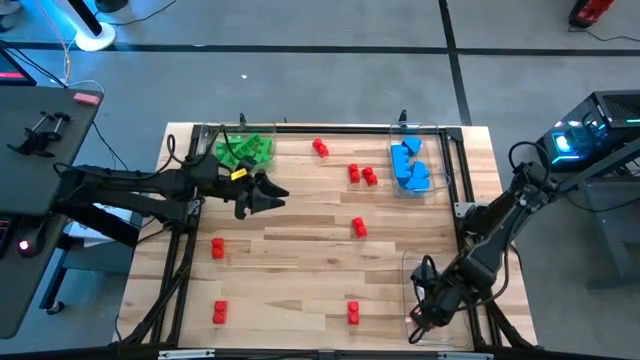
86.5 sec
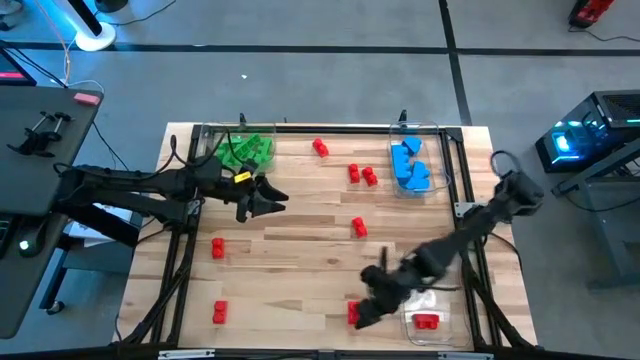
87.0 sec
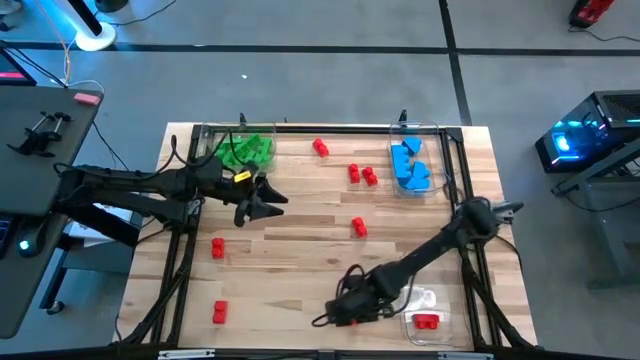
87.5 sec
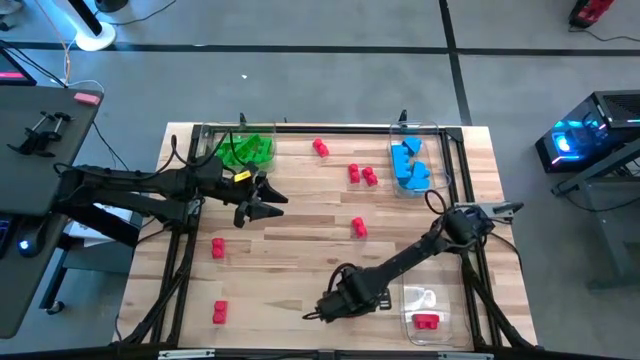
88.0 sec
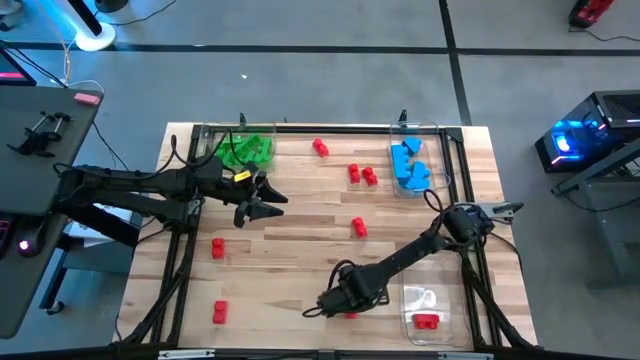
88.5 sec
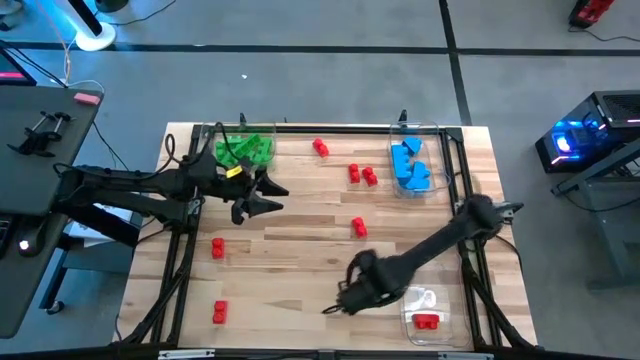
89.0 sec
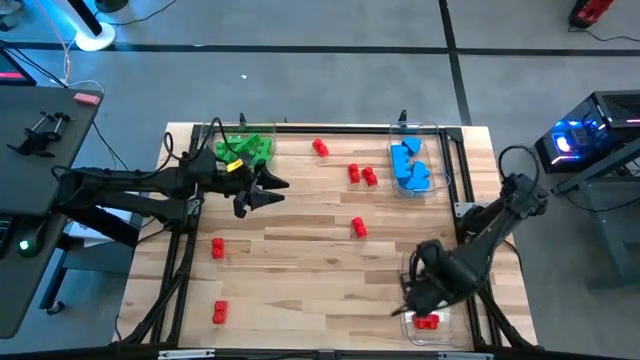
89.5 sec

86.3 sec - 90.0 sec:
Task: Sort blocks
Put the red game piece into the bottom transparent bin

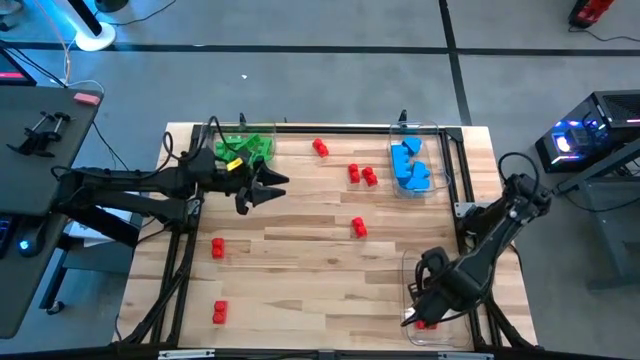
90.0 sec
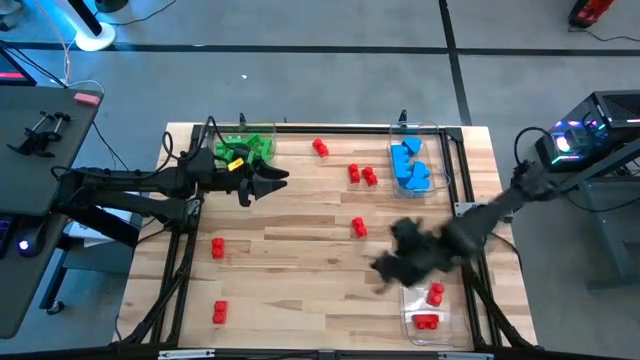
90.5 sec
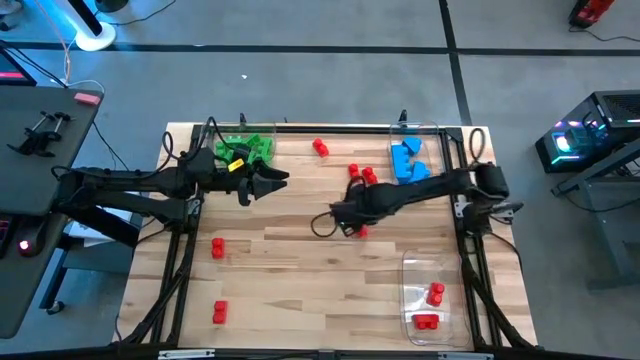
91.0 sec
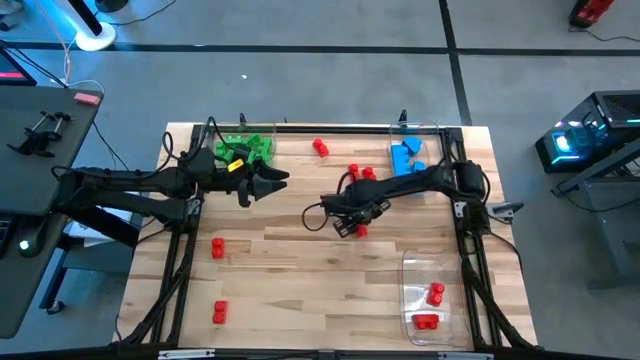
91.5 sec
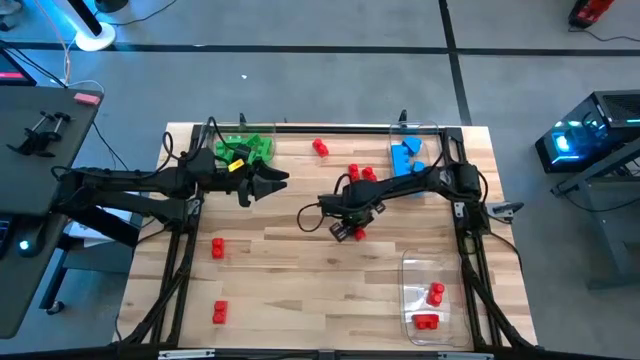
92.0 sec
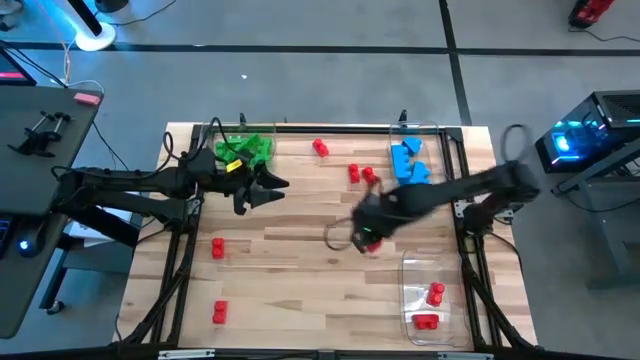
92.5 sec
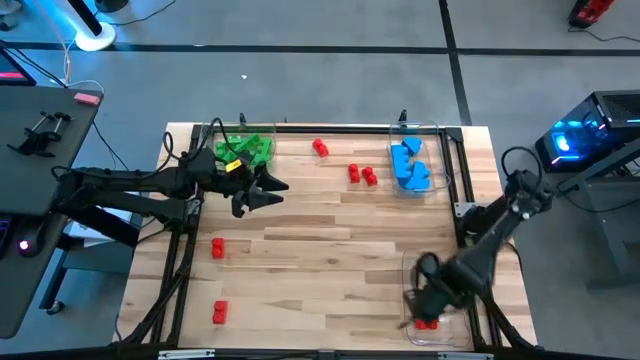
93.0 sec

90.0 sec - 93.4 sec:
Put the red game piece into the bottom transparent bin

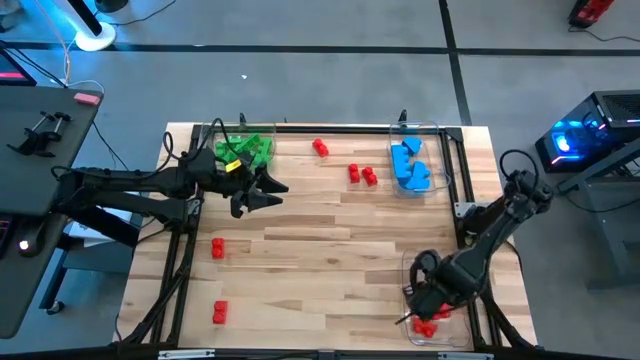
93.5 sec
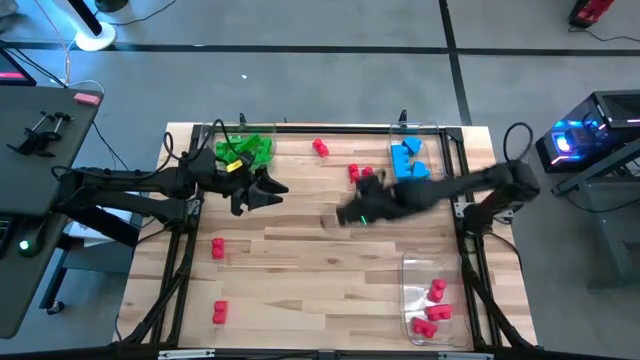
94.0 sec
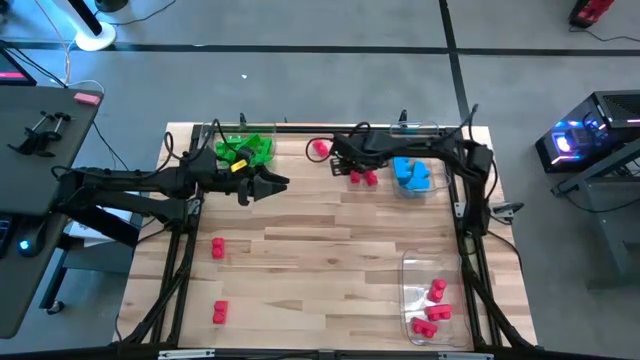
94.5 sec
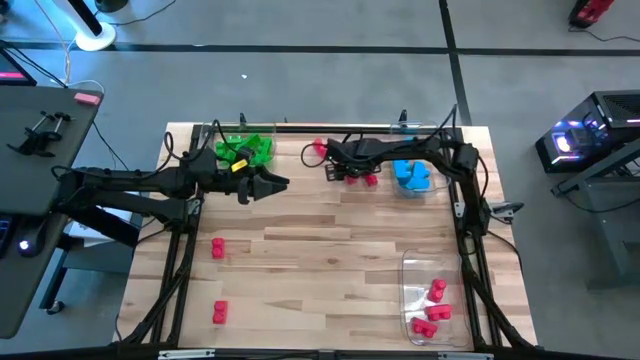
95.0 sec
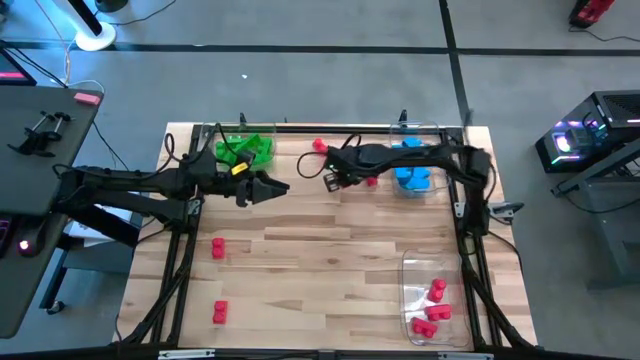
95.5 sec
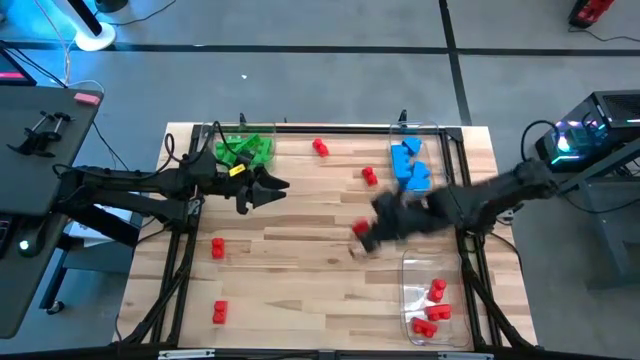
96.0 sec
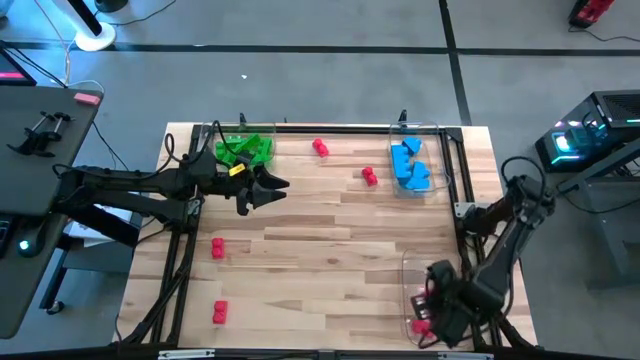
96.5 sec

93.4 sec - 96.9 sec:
Put the red game piece into the bottom transparent bin

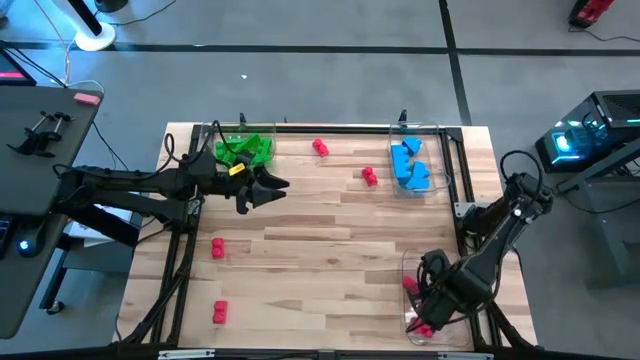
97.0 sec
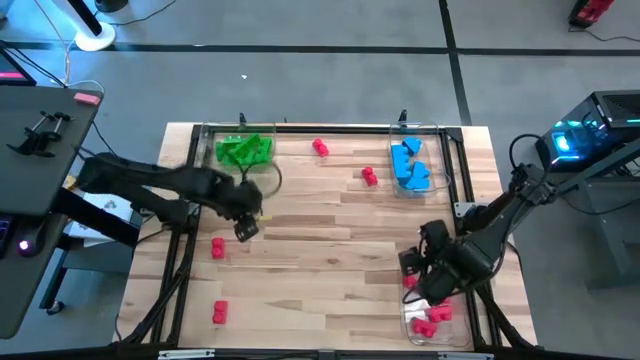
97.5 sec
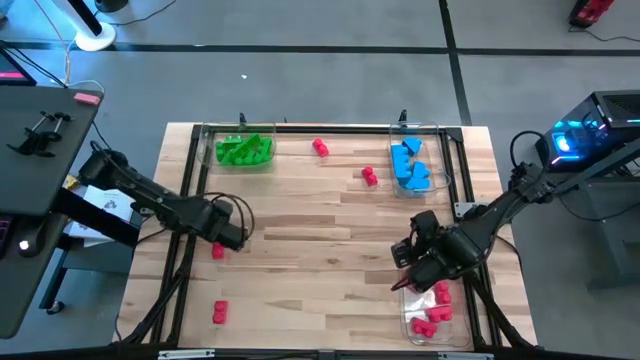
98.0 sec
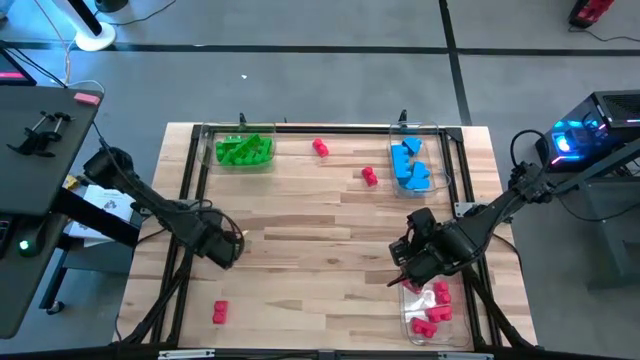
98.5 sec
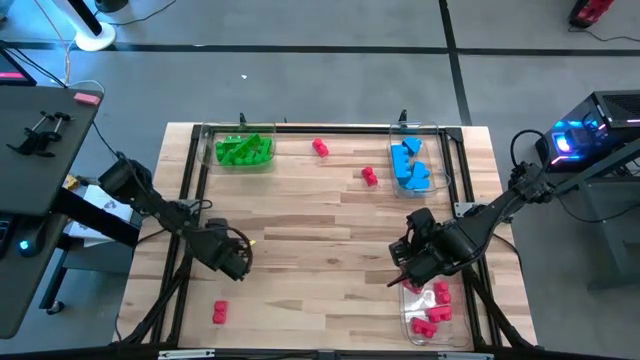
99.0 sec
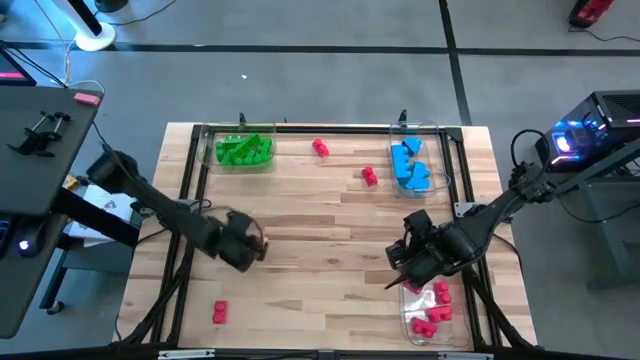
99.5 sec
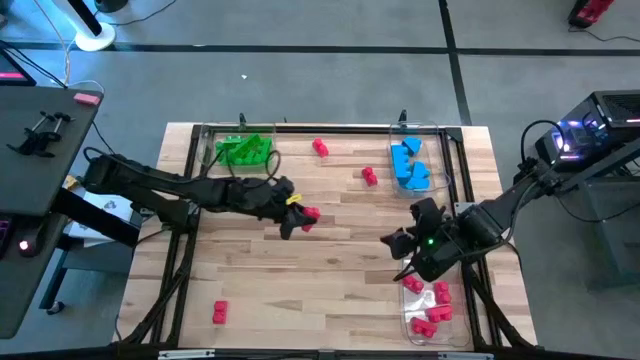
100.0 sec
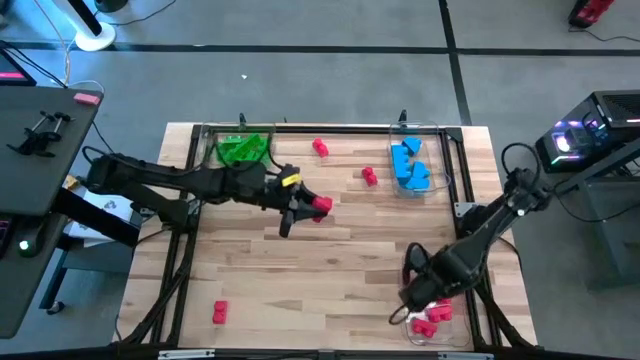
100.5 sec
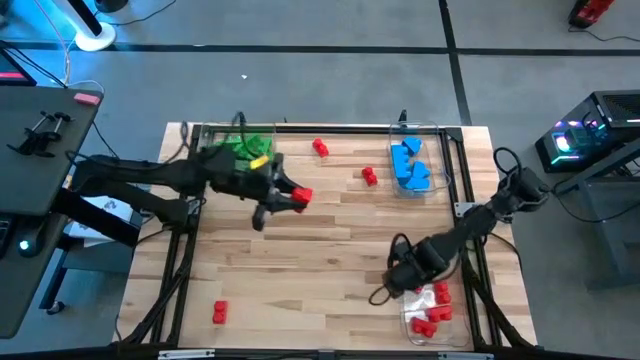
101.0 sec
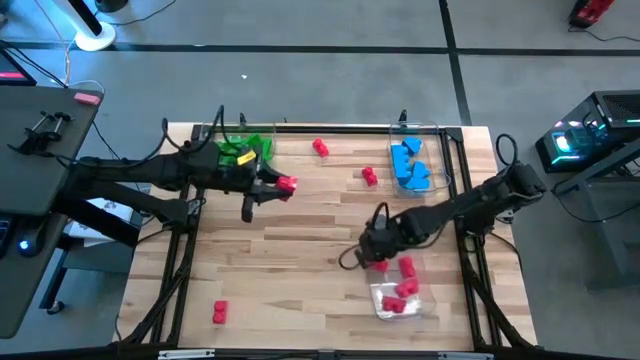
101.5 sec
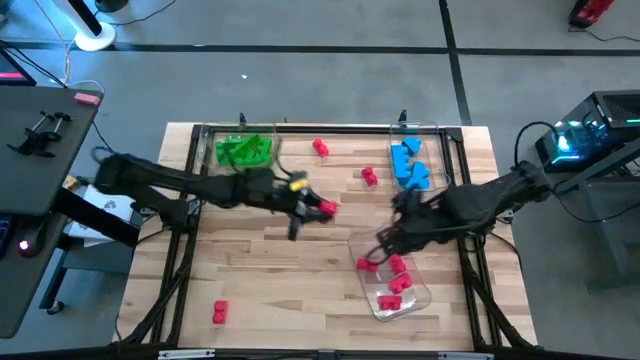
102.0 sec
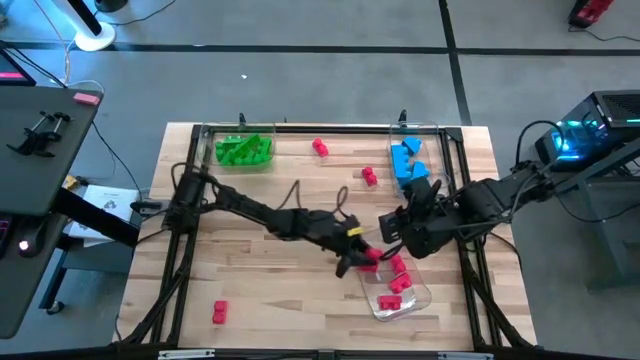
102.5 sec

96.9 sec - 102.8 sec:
Put the red game piece into the bottom transparent bin

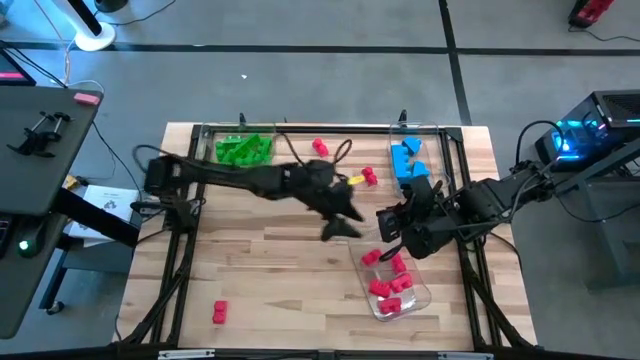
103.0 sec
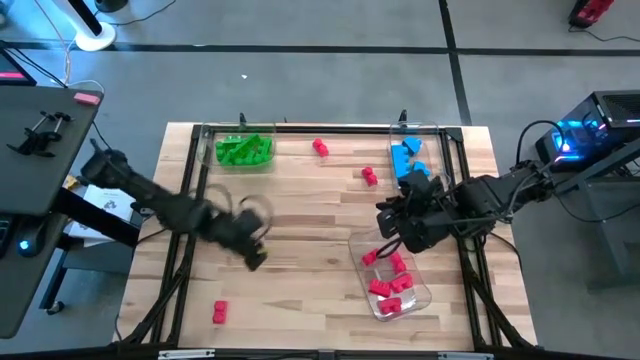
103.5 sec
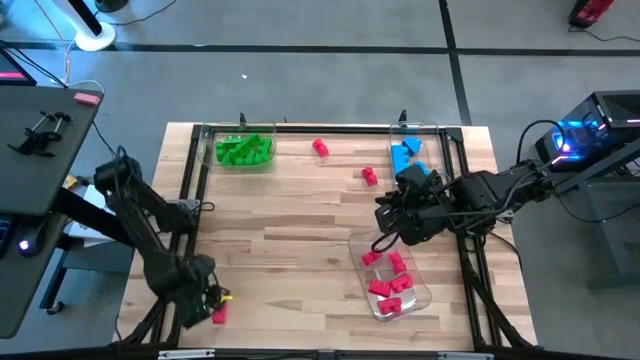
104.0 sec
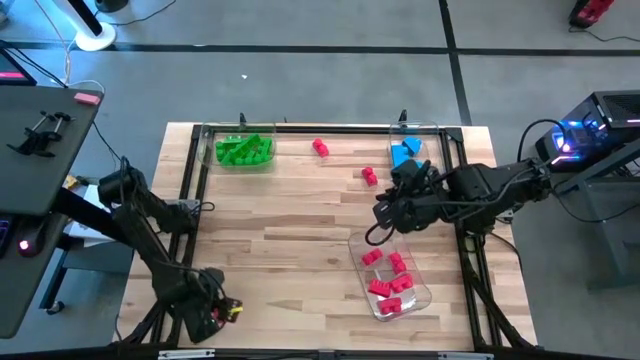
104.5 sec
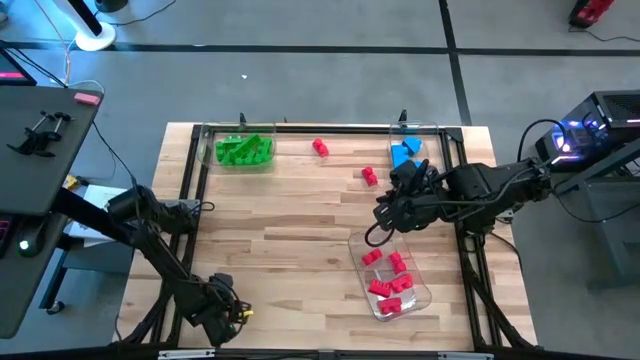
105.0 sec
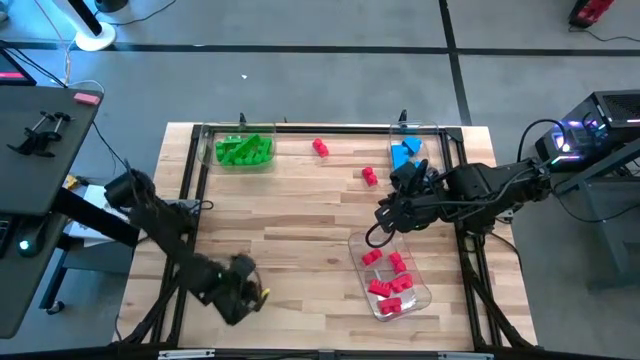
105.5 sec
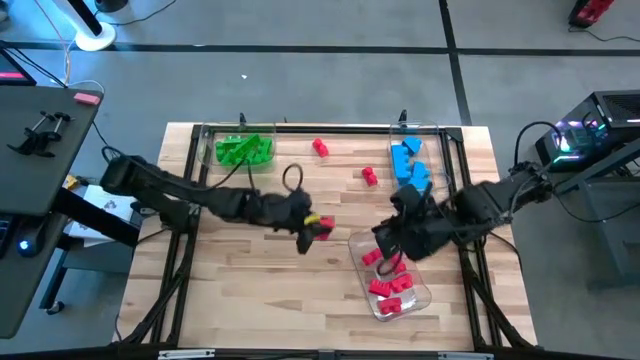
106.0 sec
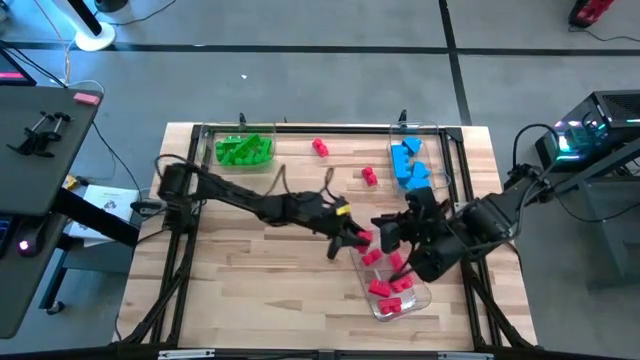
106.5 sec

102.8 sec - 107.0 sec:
Put the red game piece into the bottom transparent bin
